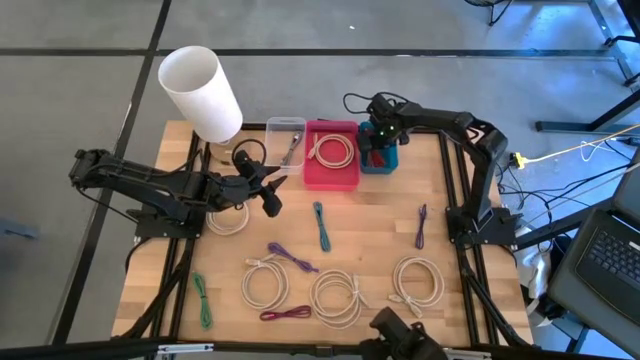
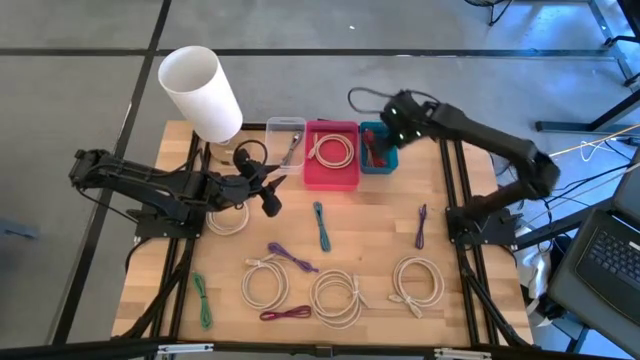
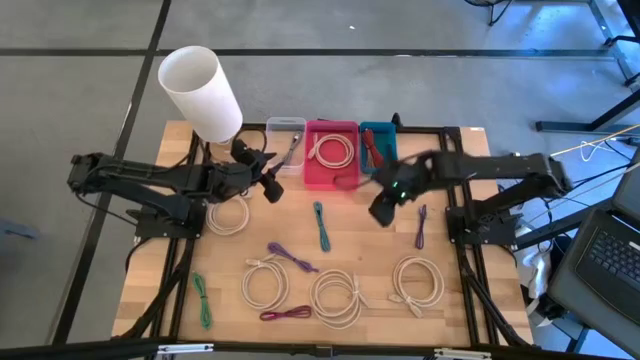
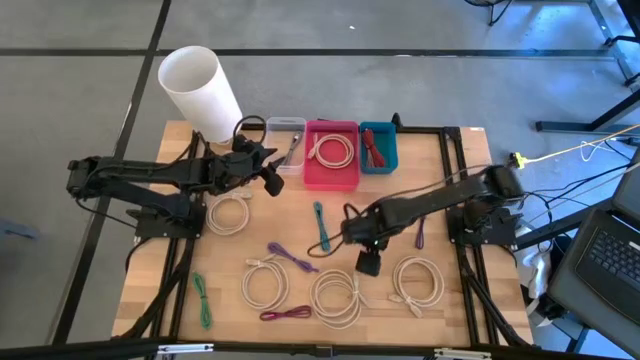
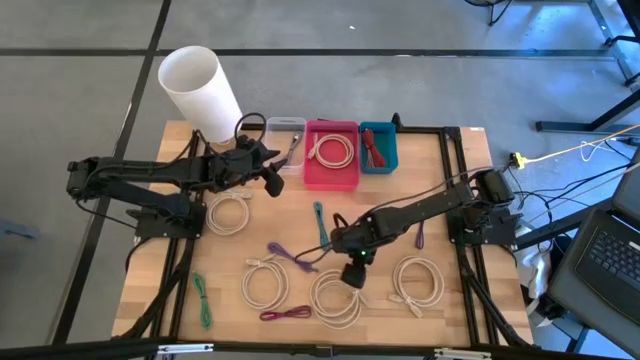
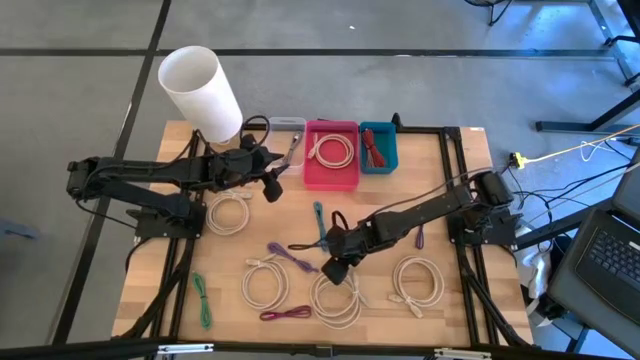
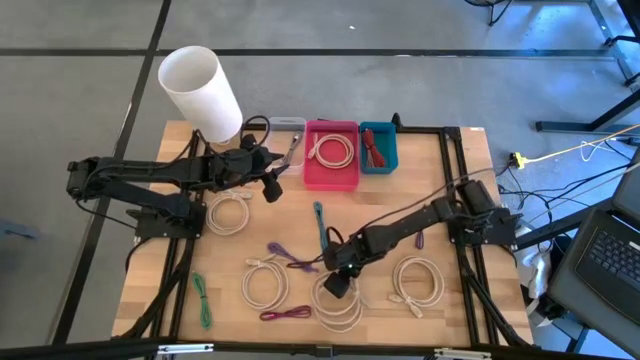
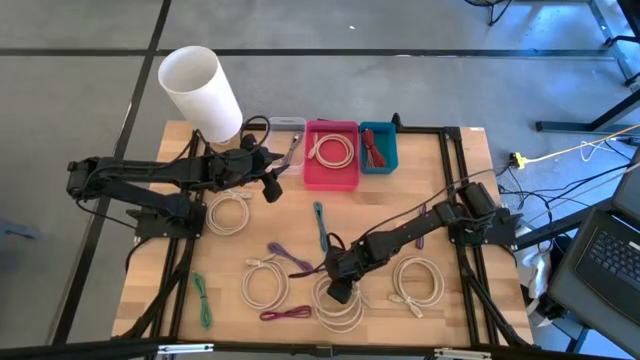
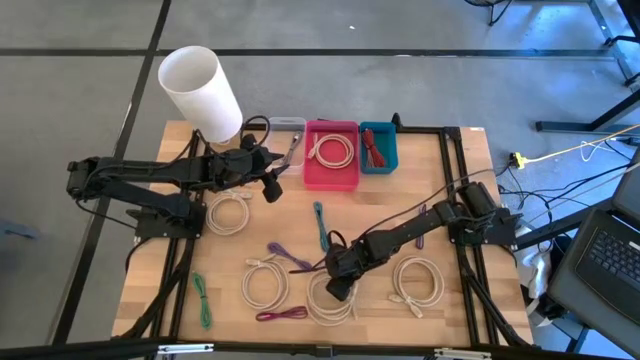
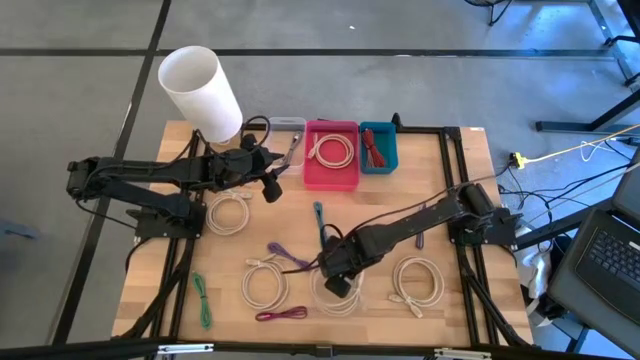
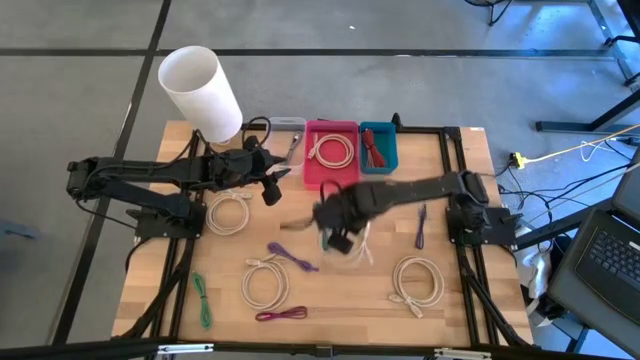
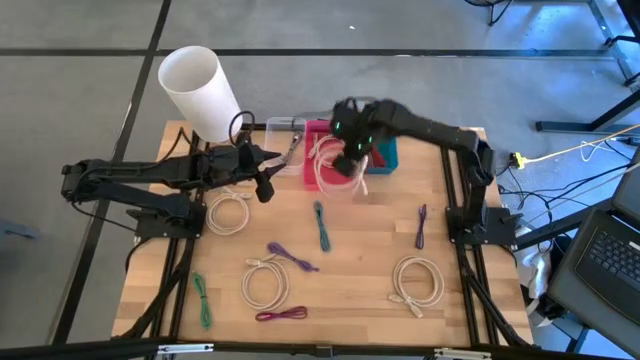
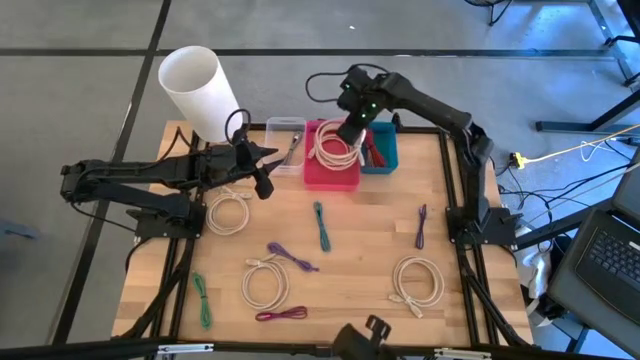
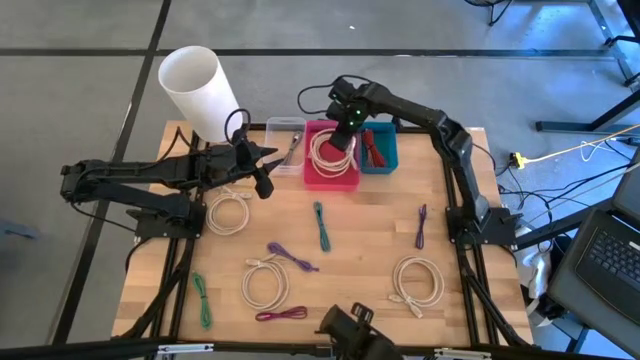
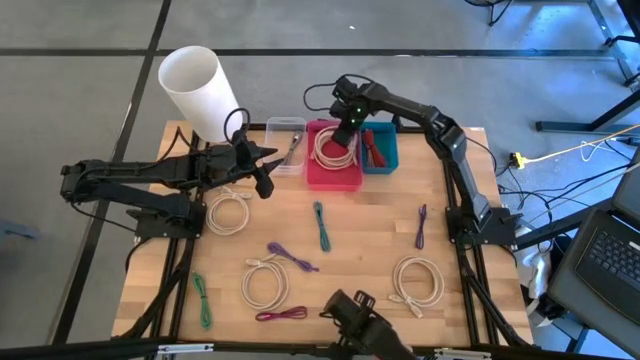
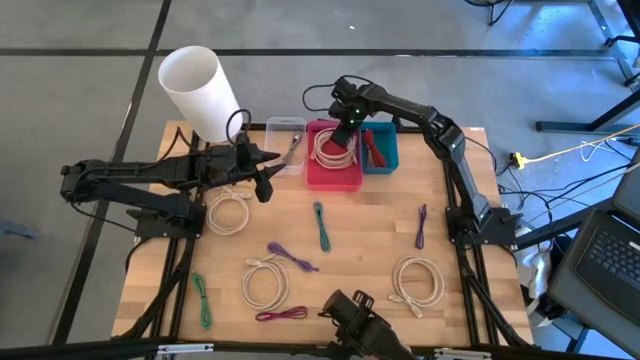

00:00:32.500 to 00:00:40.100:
Task: Pick & Place USB Port
Put the brown HDMI cable into the red bin

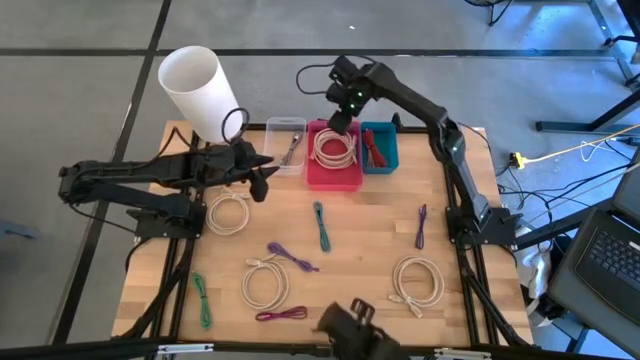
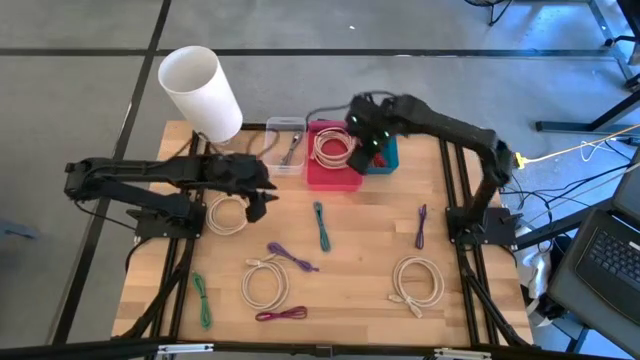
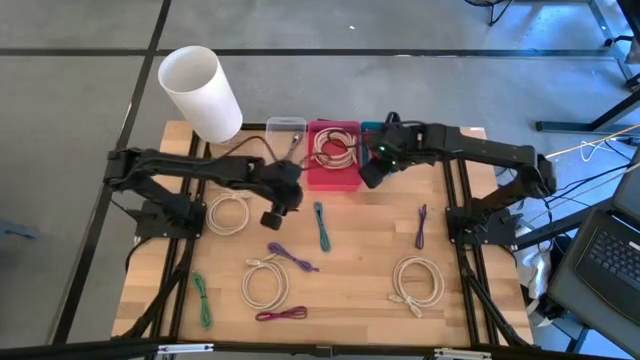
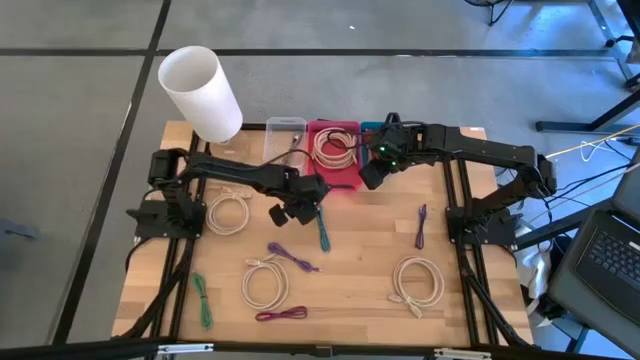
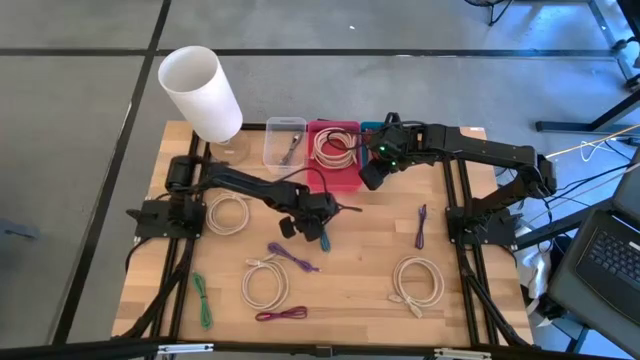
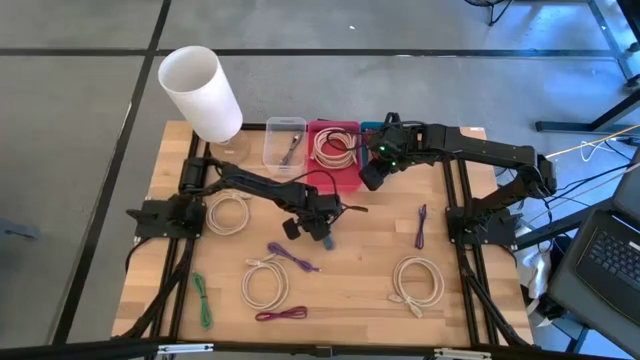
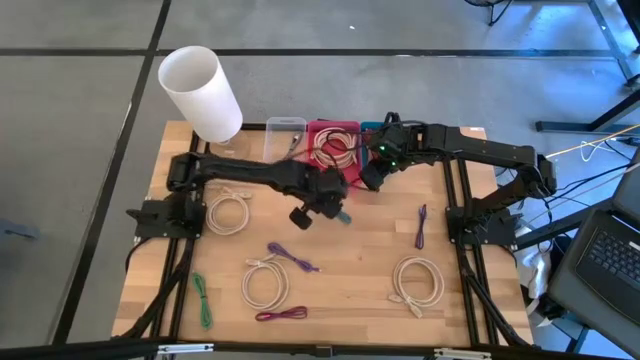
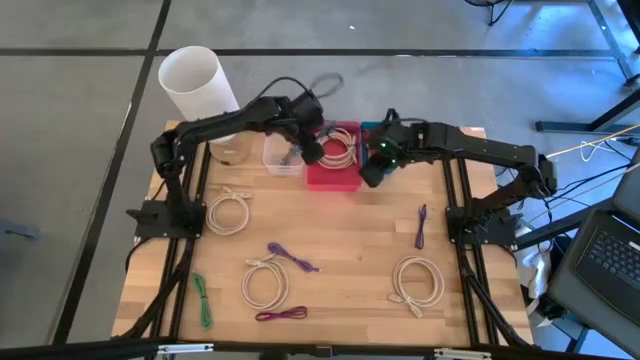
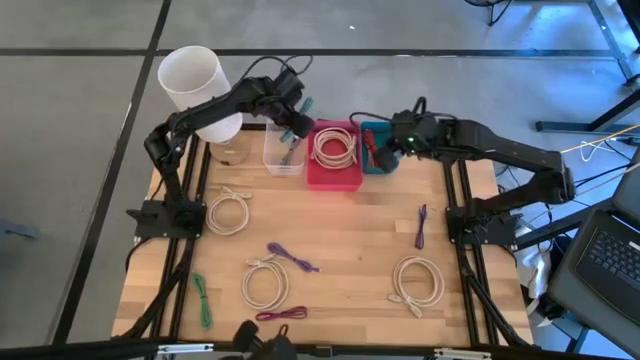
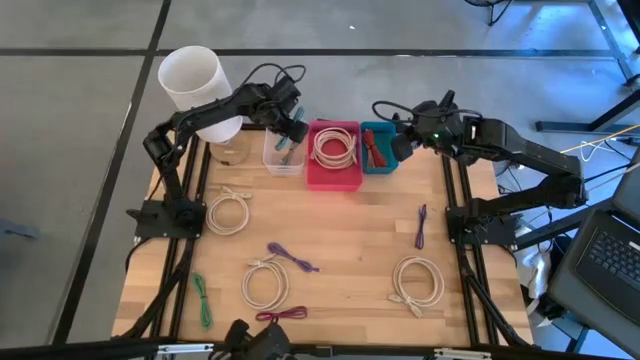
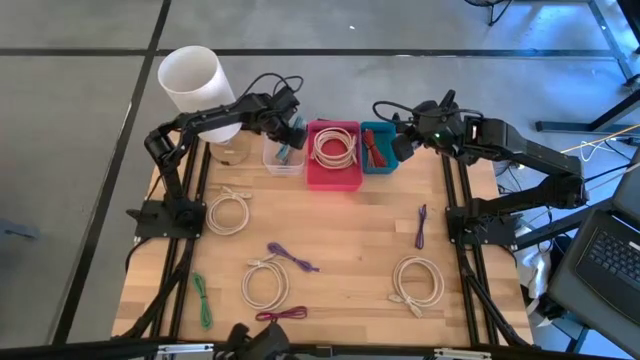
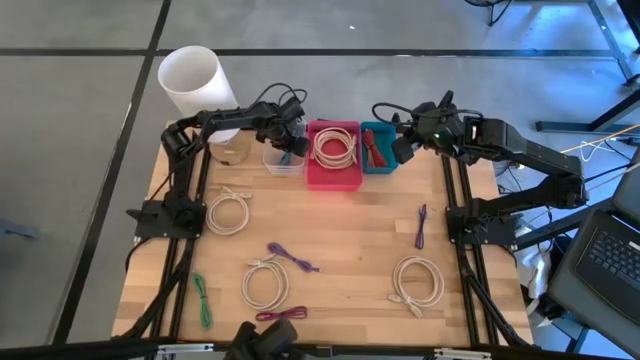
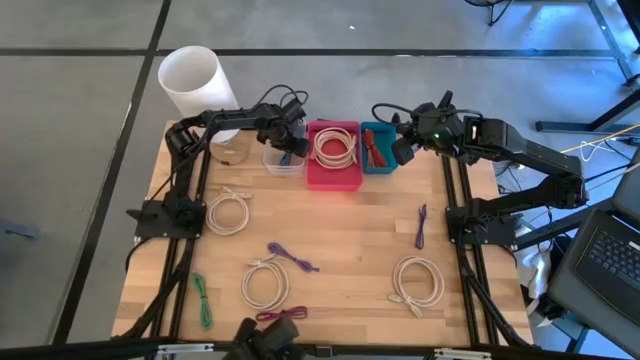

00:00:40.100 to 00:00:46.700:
Put the blue and black charger cable into the white bin

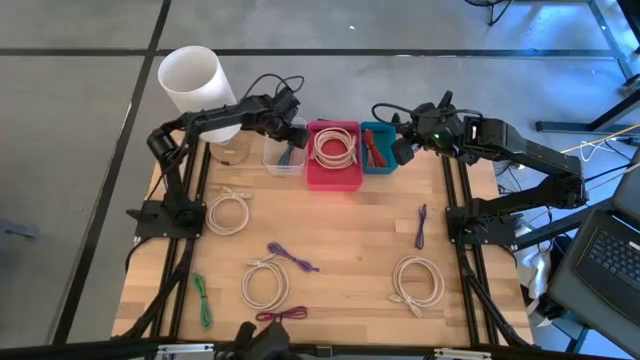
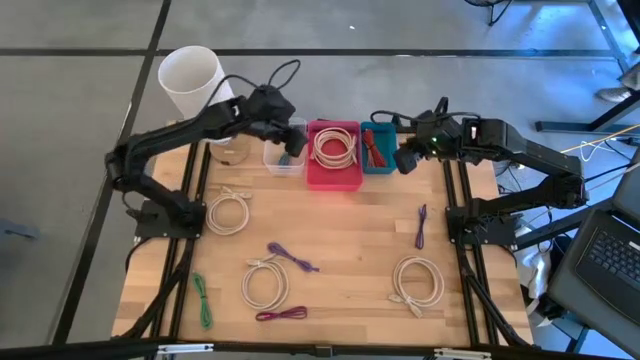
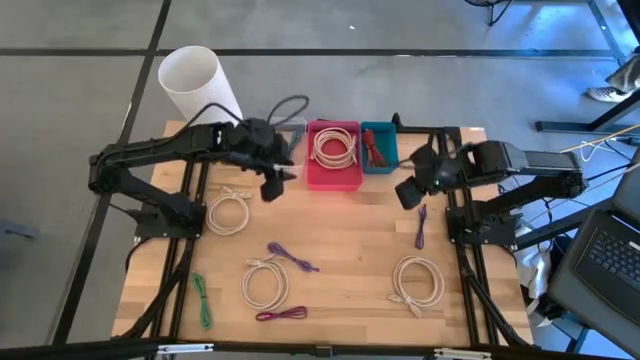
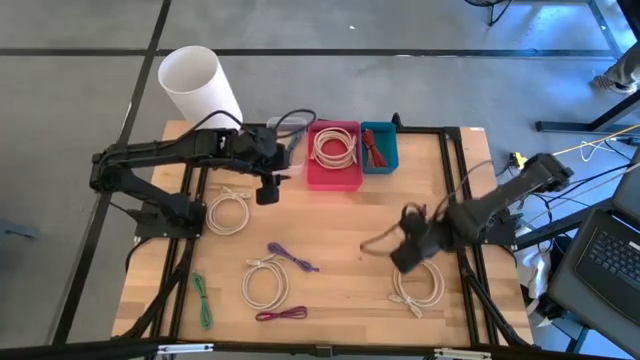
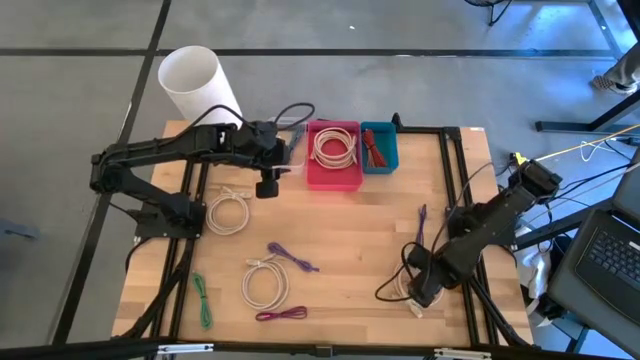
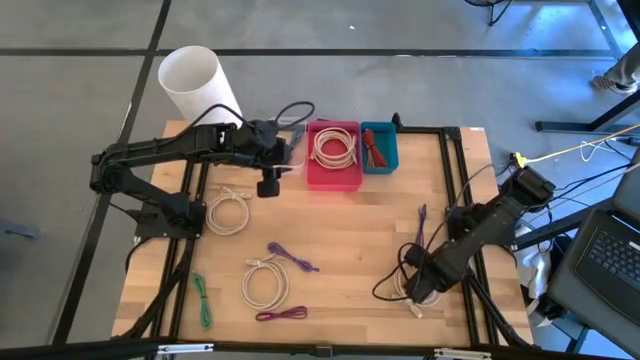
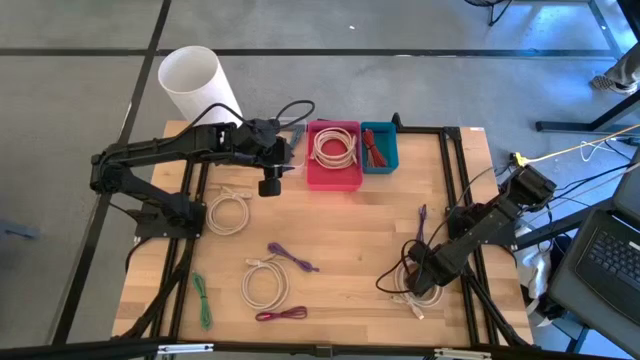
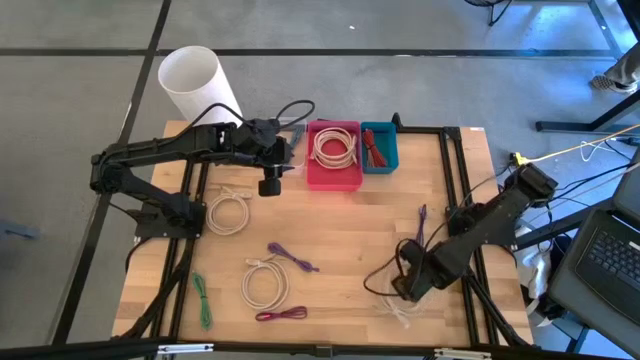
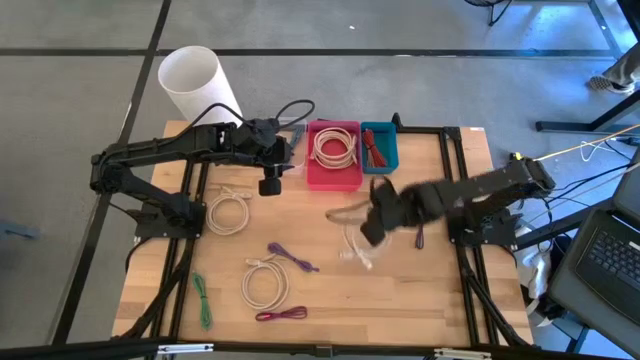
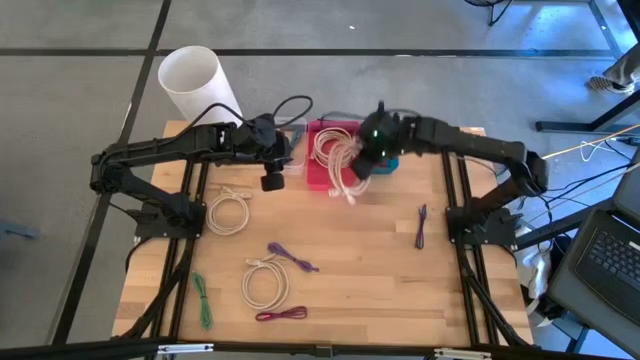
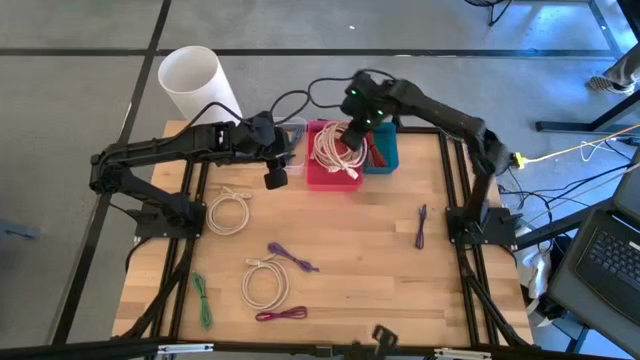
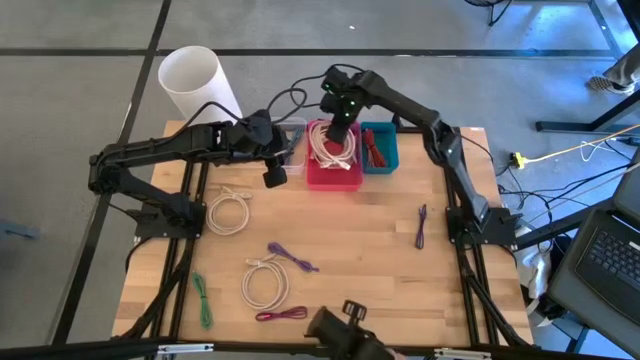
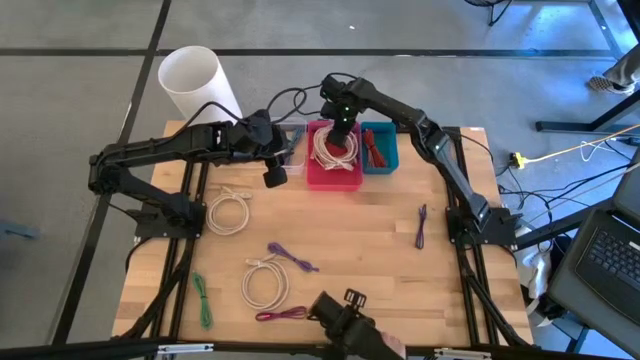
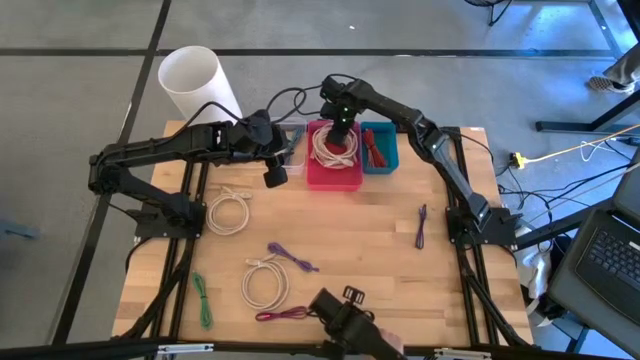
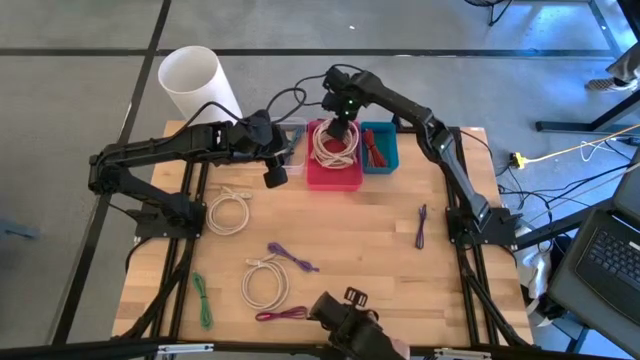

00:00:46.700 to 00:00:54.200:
Put the brown HDMI cable into the red bin
